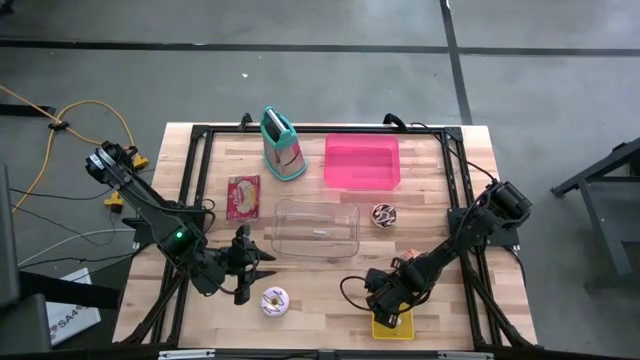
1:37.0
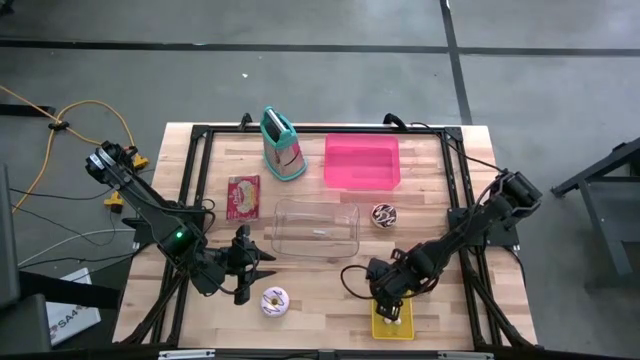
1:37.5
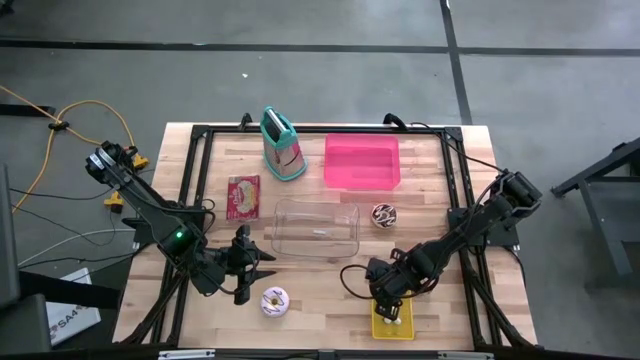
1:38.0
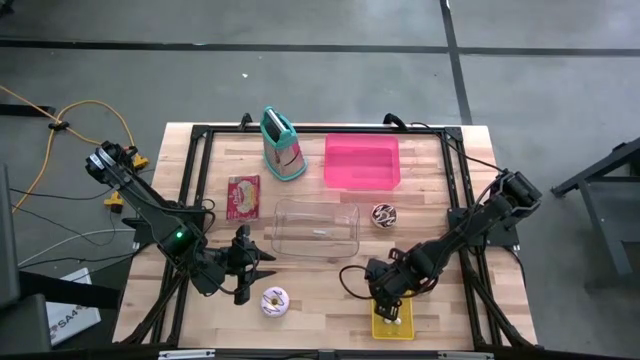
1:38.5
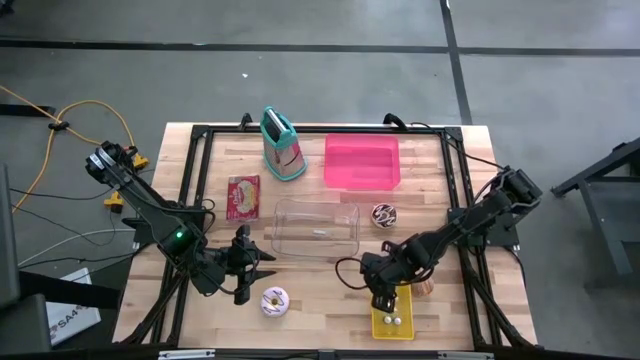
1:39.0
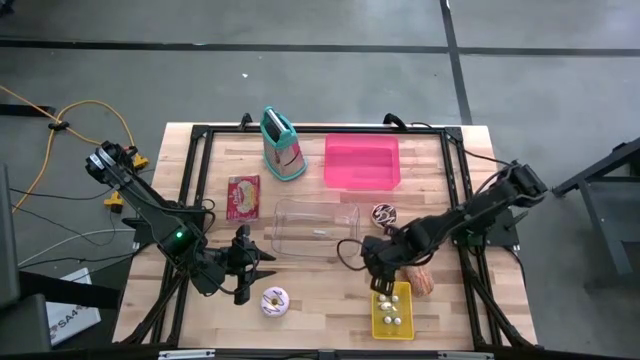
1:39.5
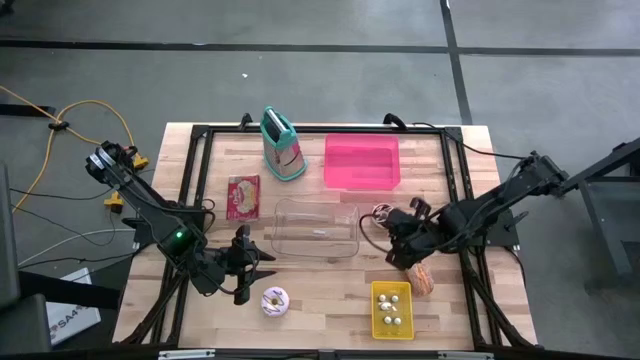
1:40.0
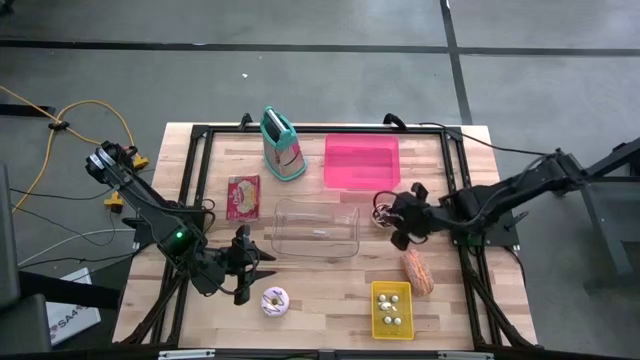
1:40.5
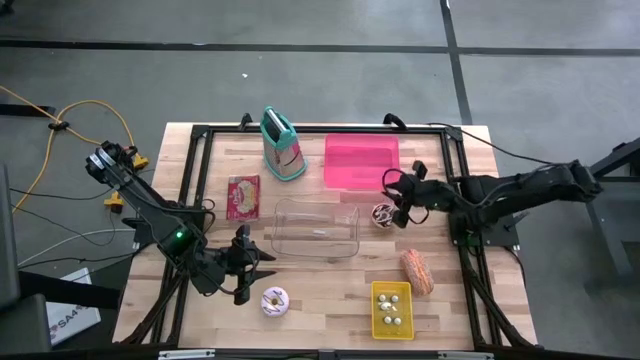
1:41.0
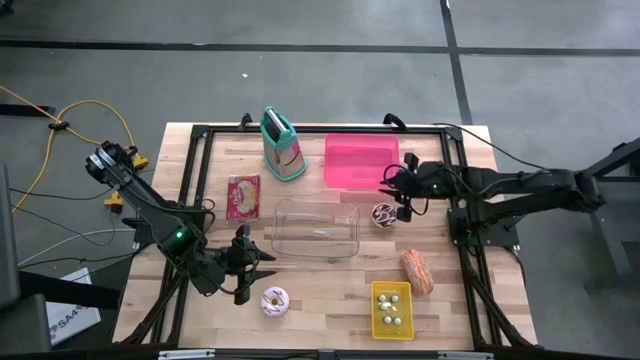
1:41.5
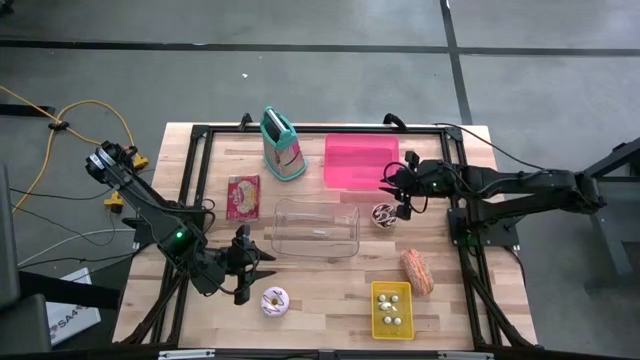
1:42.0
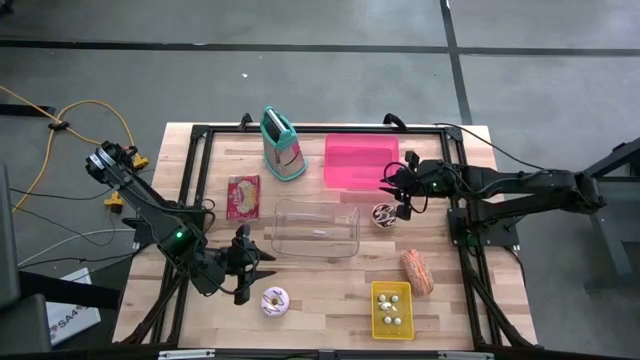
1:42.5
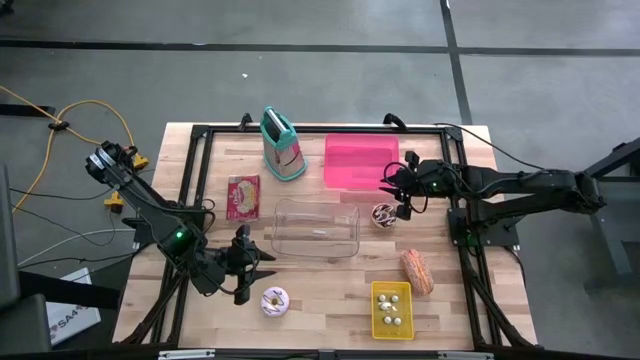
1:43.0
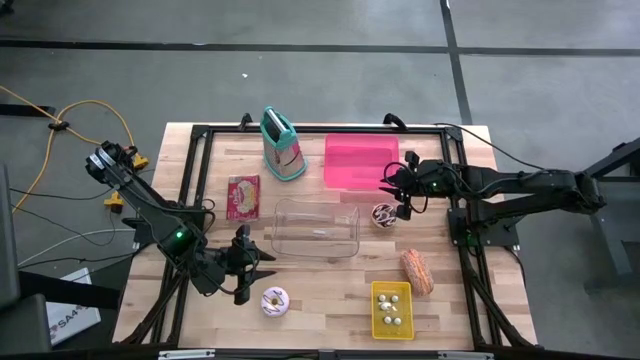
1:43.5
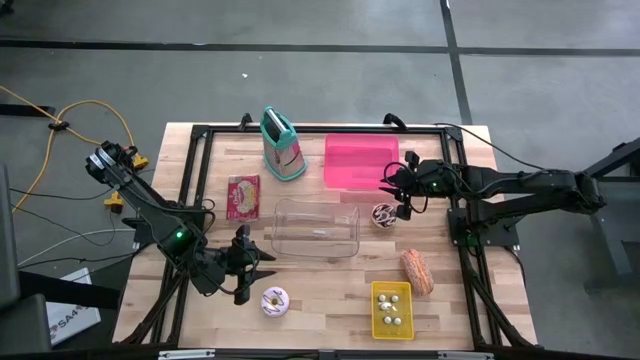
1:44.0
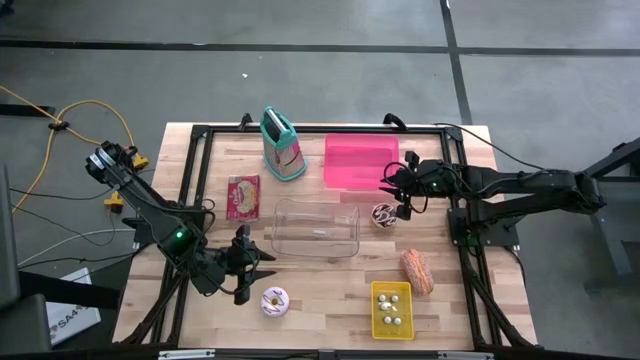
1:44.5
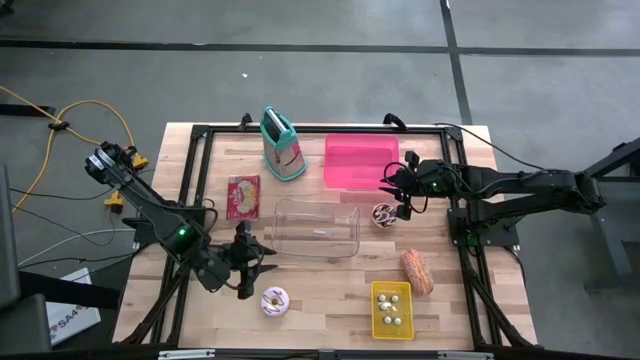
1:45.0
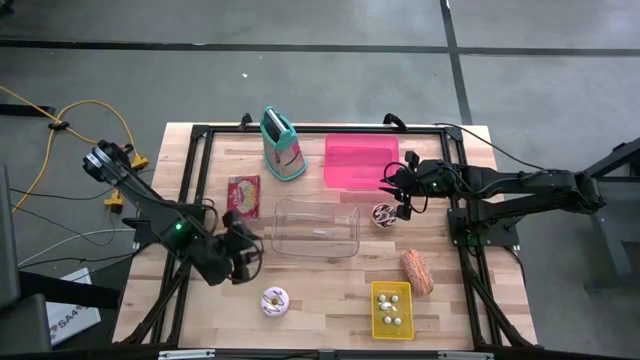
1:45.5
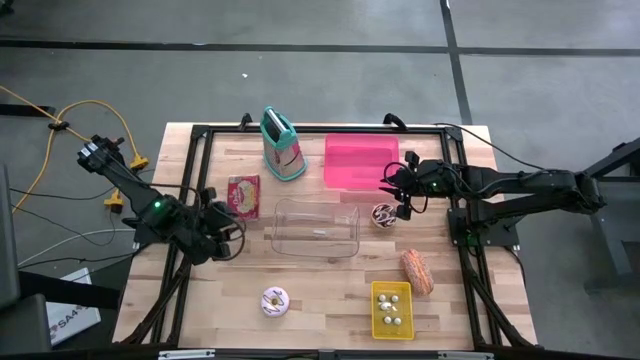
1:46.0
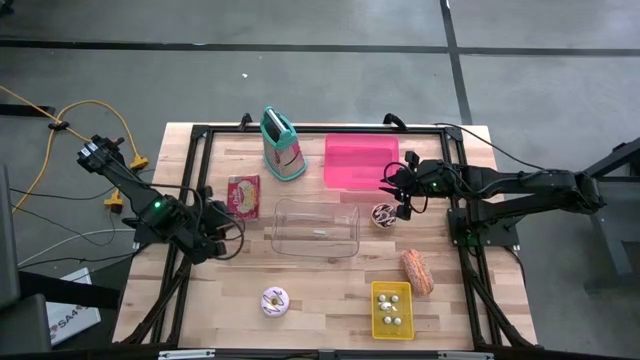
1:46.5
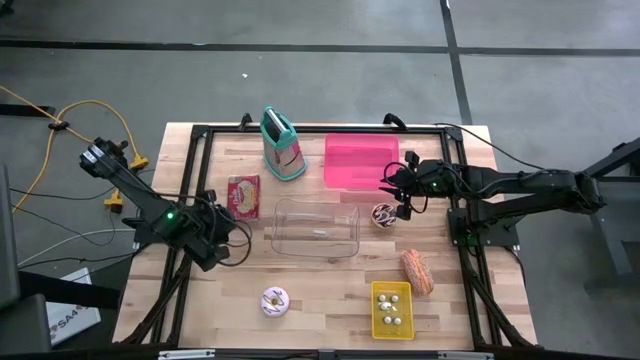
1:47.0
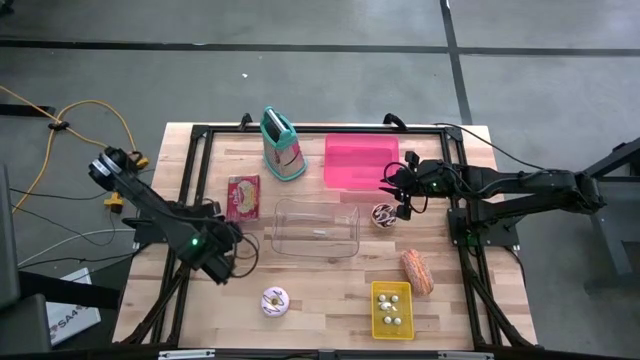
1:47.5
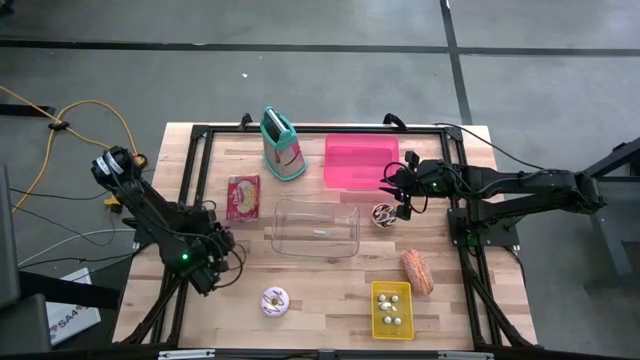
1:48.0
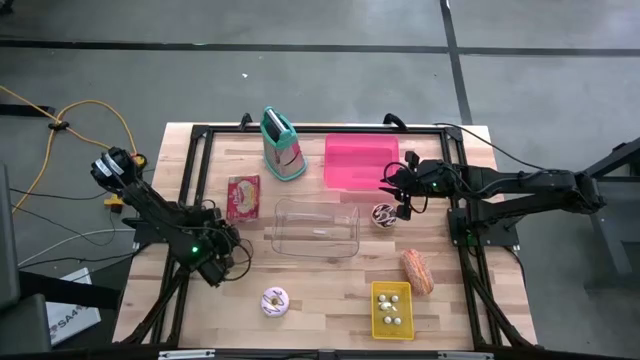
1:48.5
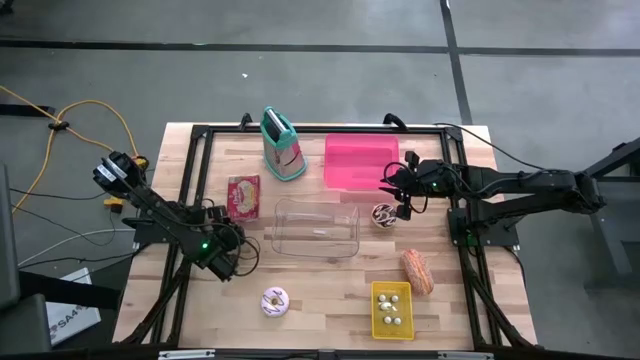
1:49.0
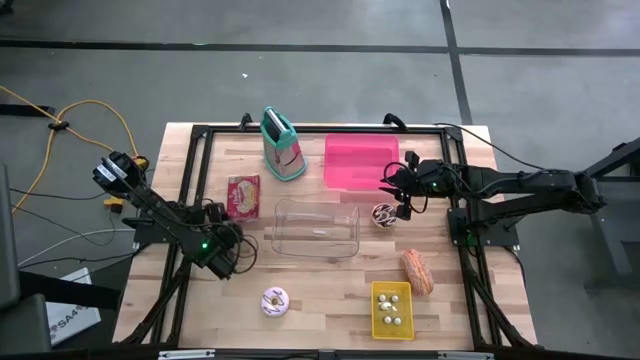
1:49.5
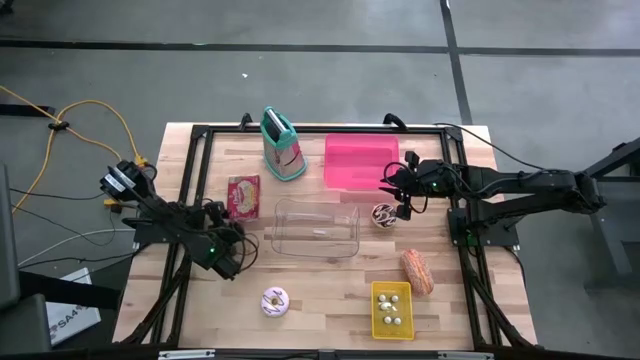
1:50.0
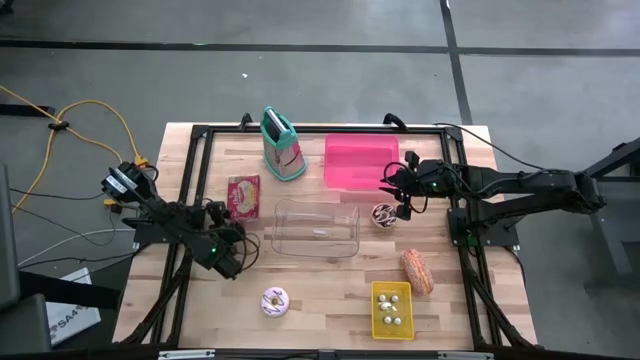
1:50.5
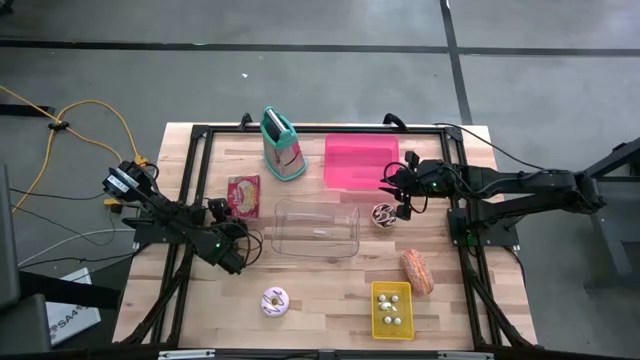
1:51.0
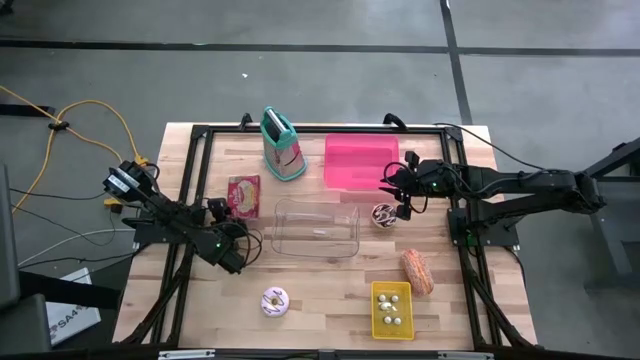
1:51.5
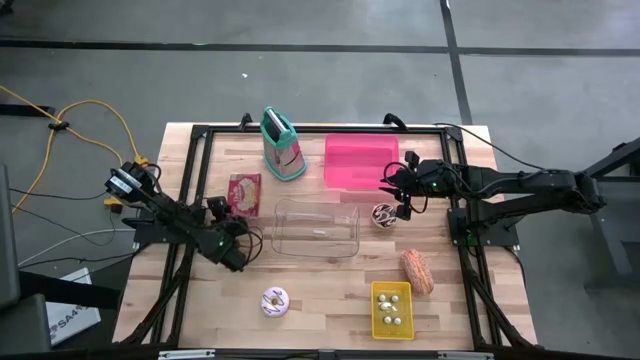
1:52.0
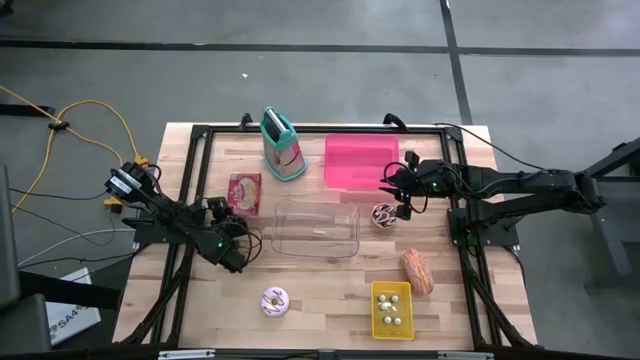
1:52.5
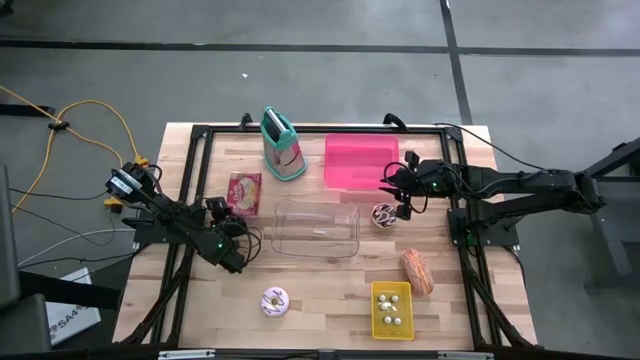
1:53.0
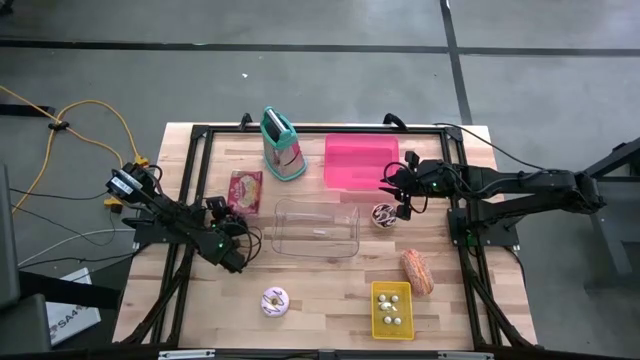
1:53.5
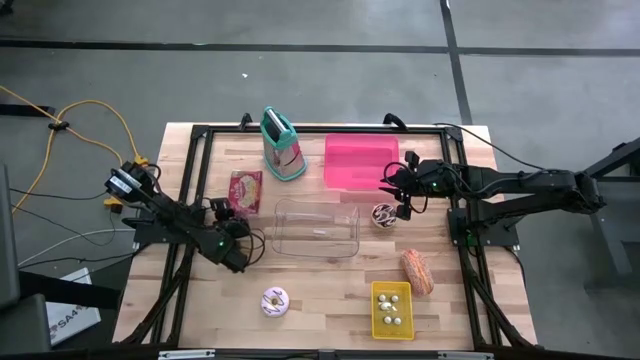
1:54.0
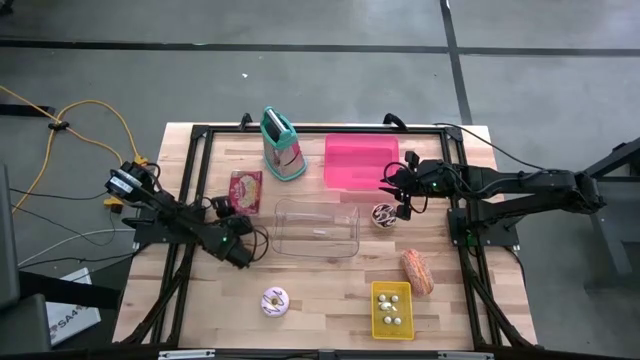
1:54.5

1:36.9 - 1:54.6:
Put the red popcorn bag into the pink bin
